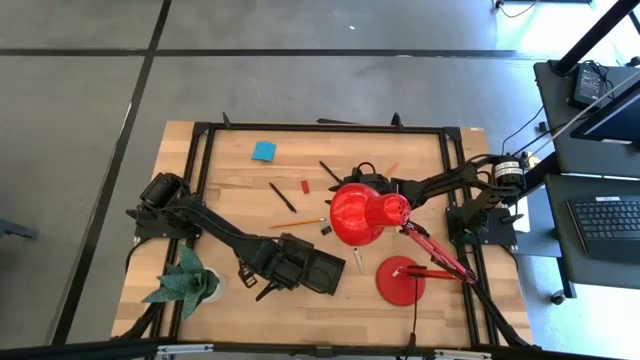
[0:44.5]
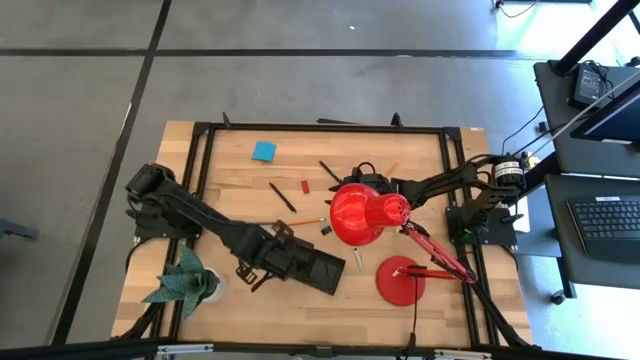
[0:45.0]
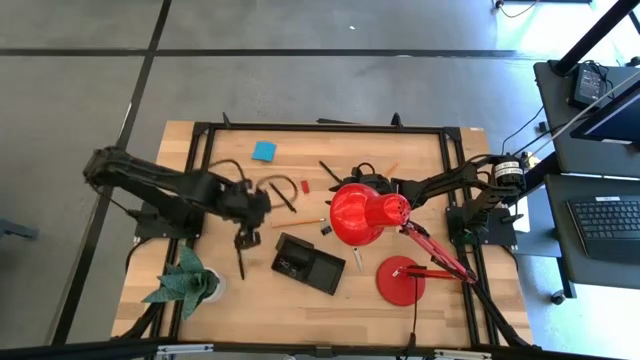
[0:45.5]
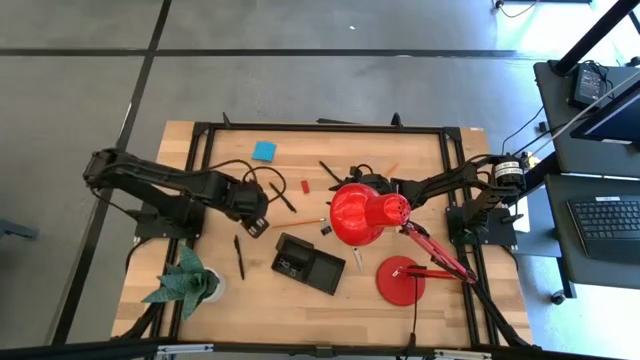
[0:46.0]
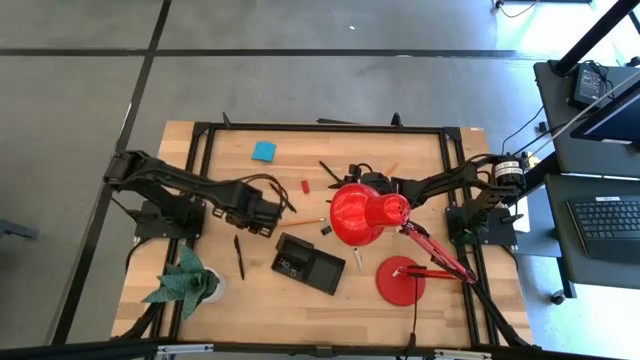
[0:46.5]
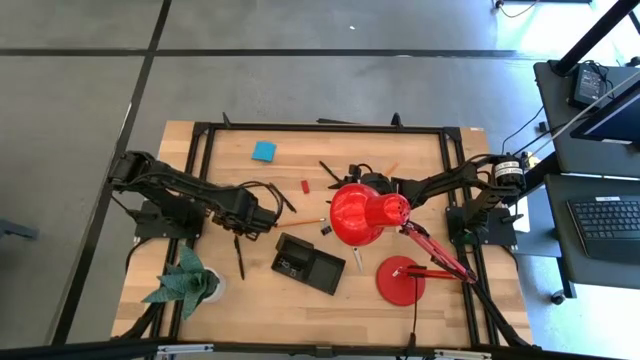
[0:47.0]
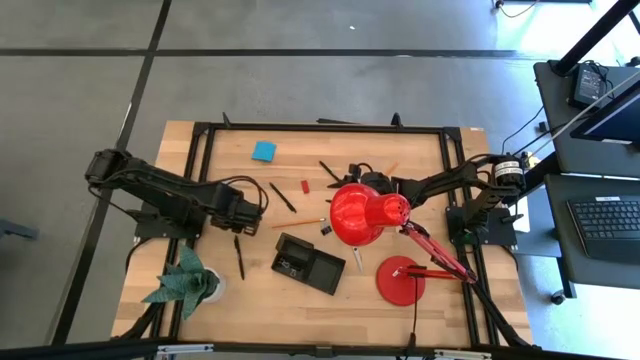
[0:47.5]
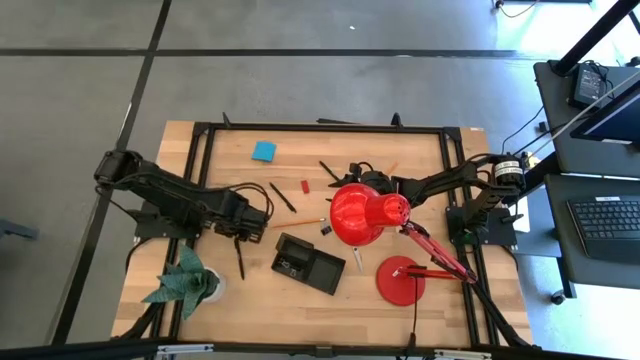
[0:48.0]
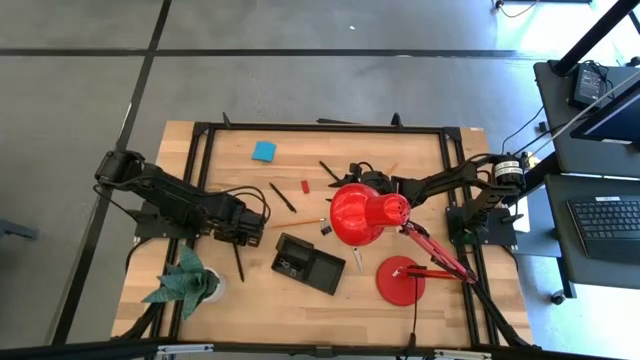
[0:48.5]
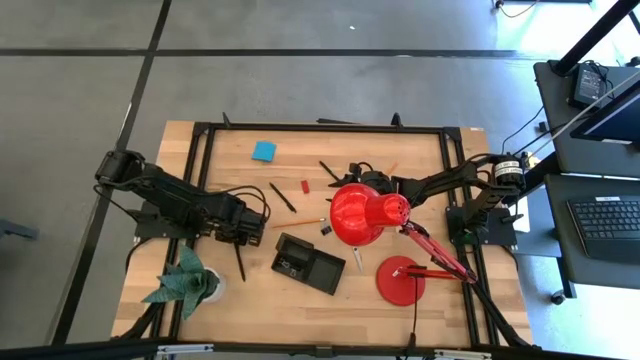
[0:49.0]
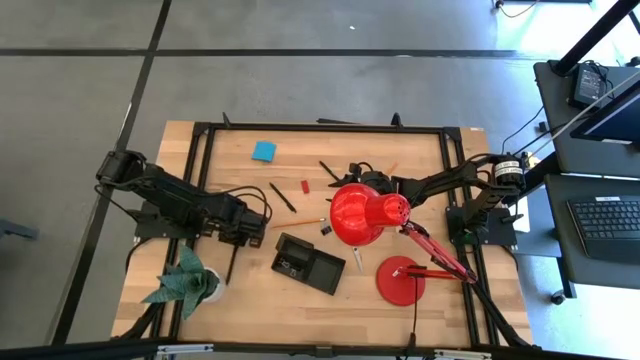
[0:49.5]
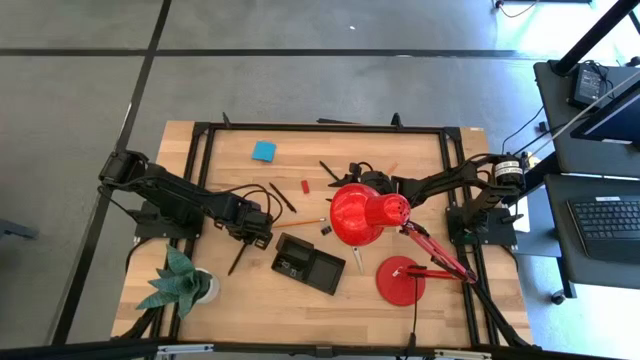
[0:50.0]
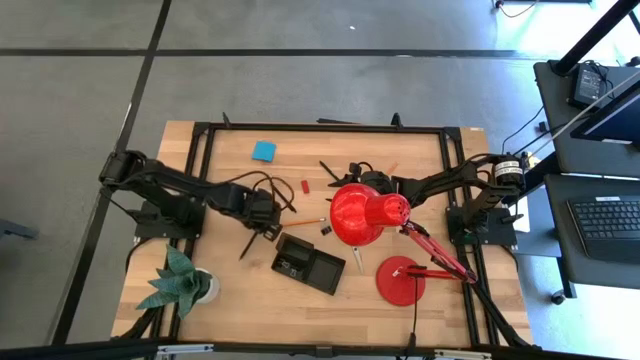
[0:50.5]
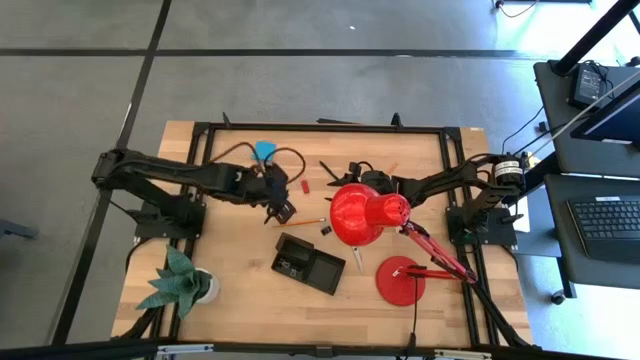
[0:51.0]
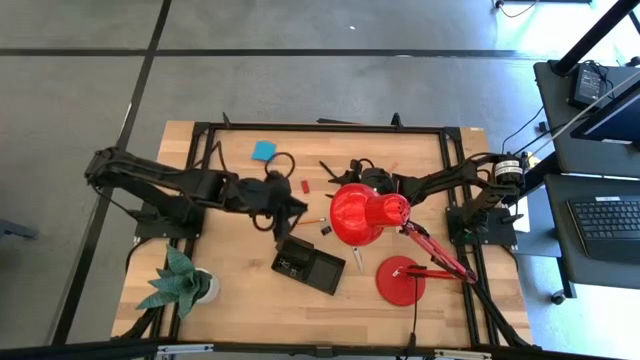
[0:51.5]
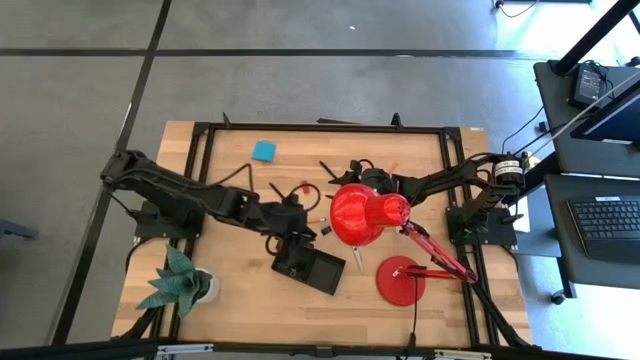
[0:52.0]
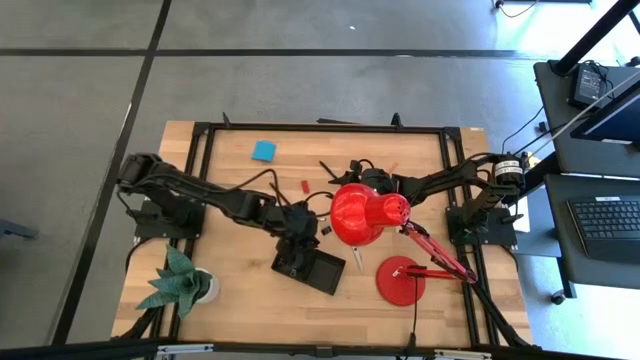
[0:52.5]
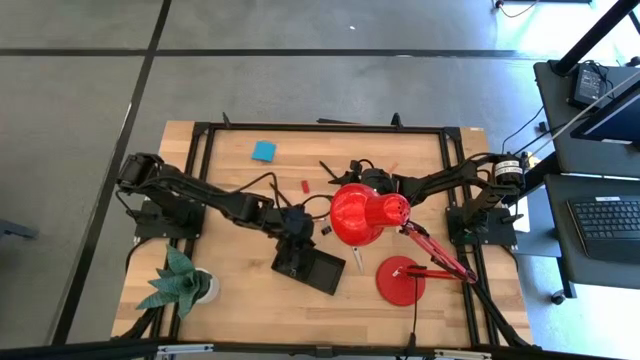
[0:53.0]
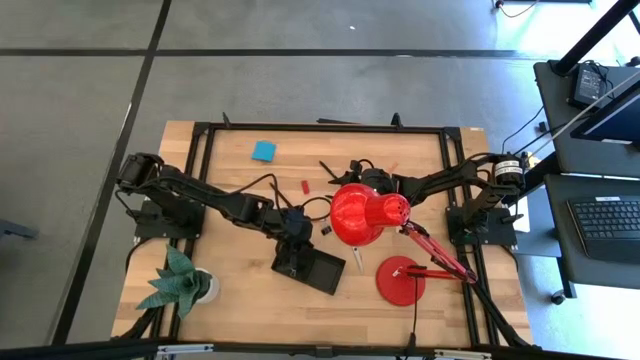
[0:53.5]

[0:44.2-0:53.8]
Task: Pick and place office supplies into organizer
Put the bottom black pen into the desk organizer

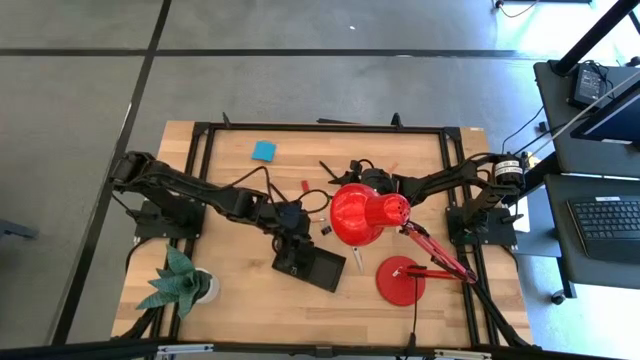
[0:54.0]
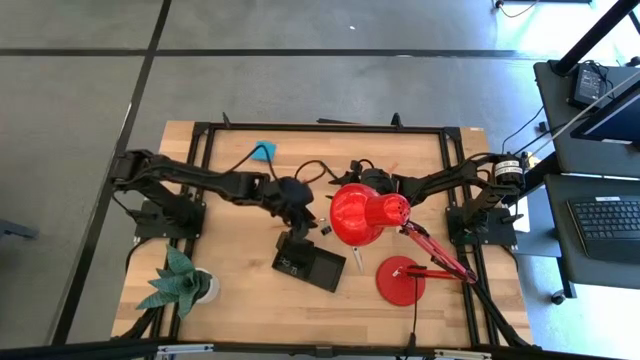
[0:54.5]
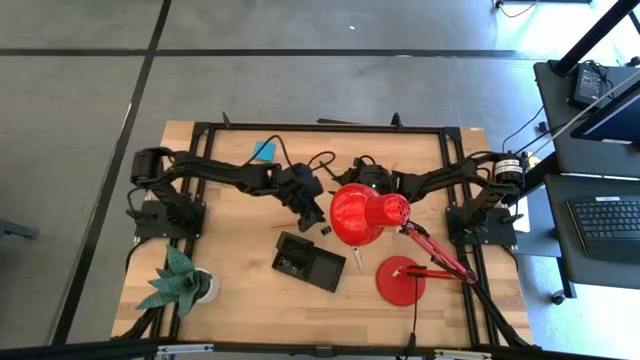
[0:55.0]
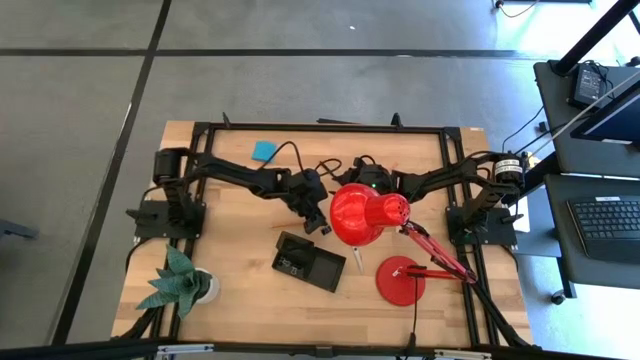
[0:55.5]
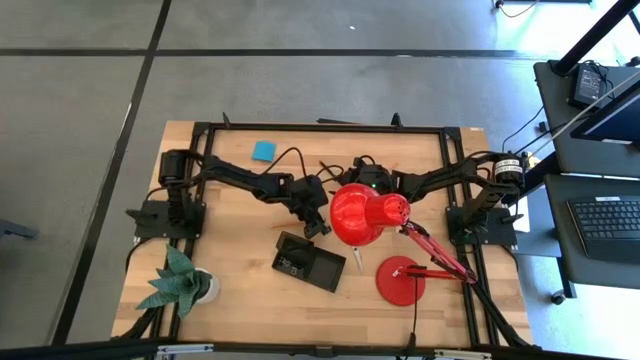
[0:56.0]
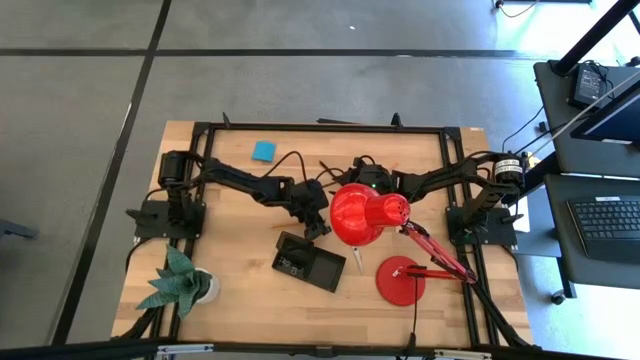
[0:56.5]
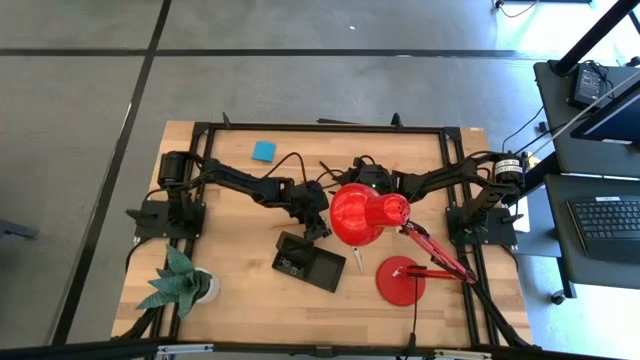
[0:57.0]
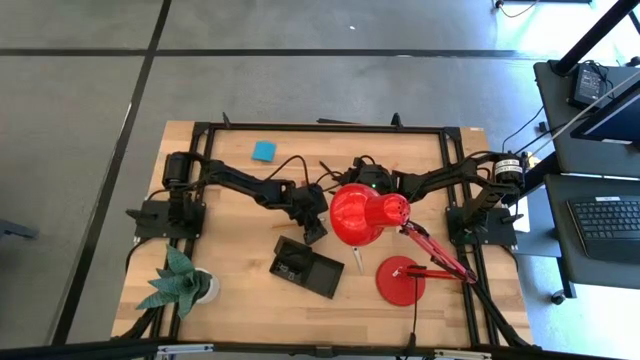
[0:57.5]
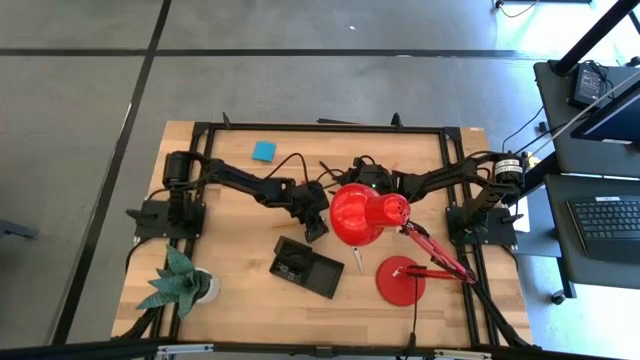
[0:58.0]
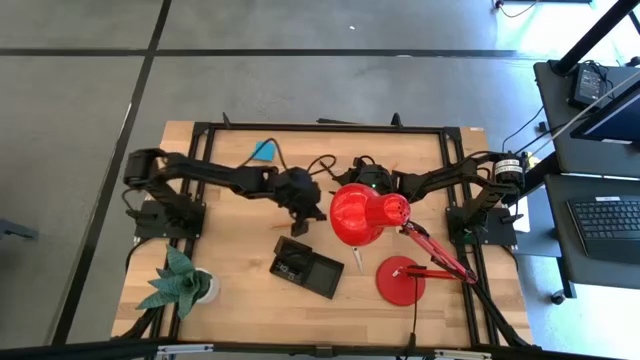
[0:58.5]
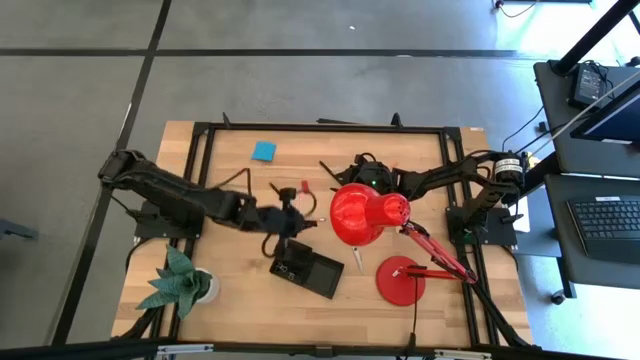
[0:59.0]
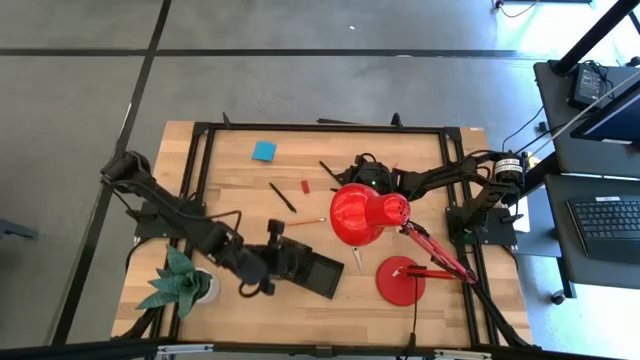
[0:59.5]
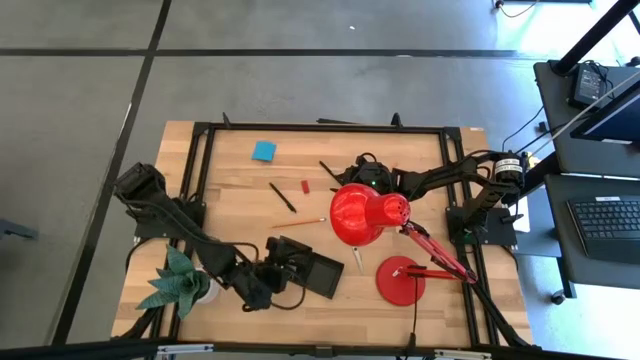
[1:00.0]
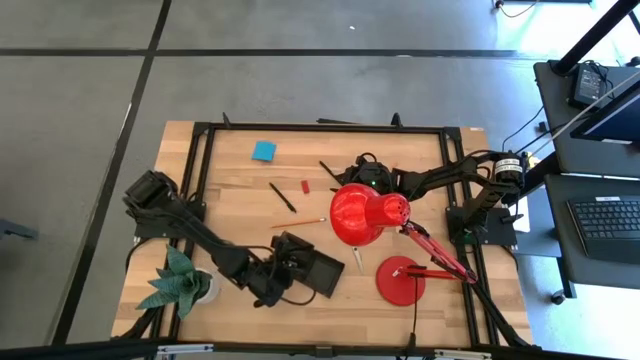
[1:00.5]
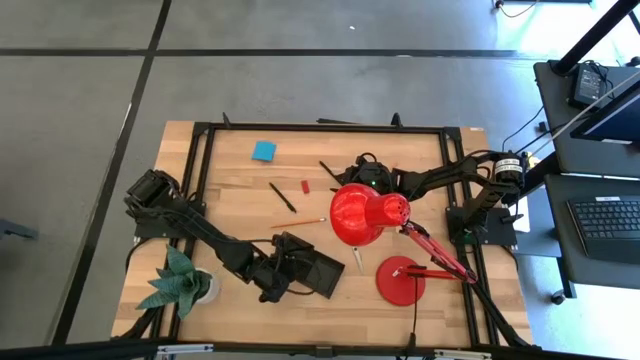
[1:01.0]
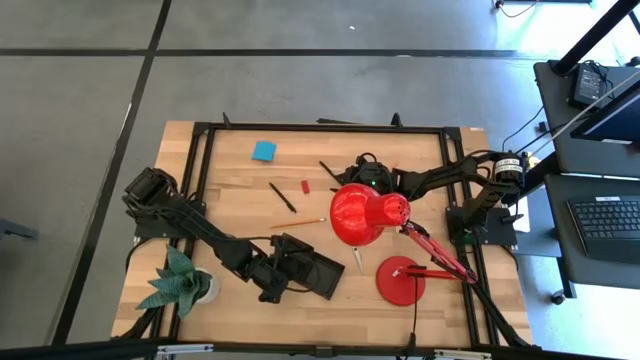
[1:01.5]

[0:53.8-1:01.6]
Put the black clip binder into the desk organizer

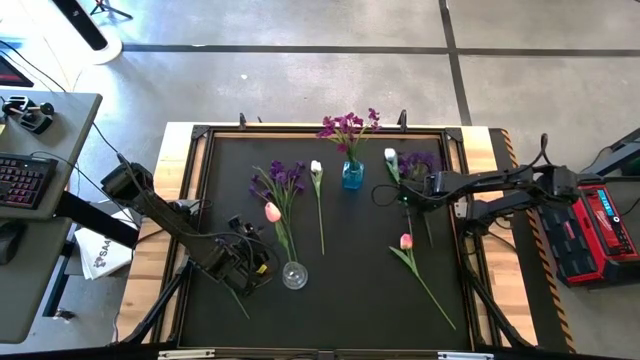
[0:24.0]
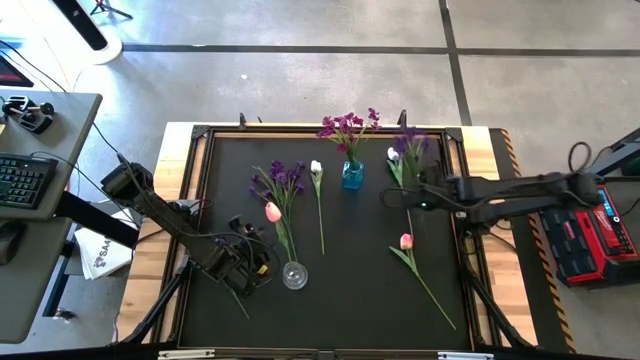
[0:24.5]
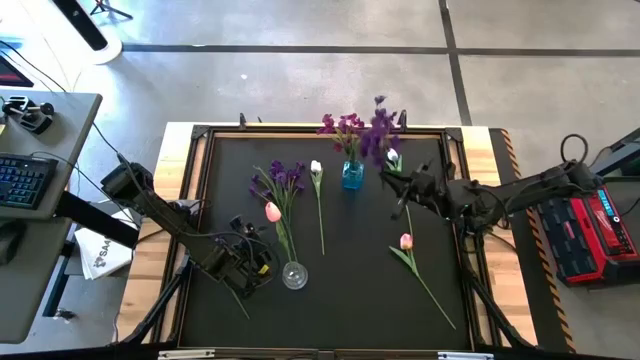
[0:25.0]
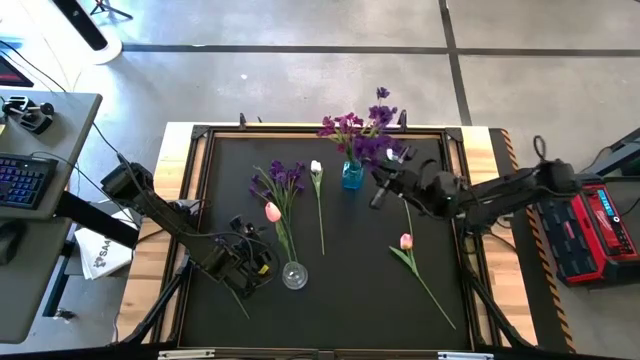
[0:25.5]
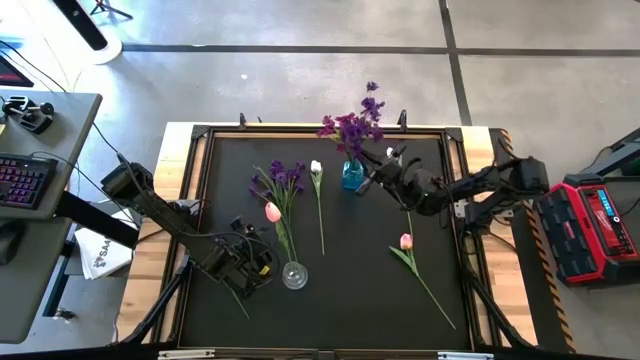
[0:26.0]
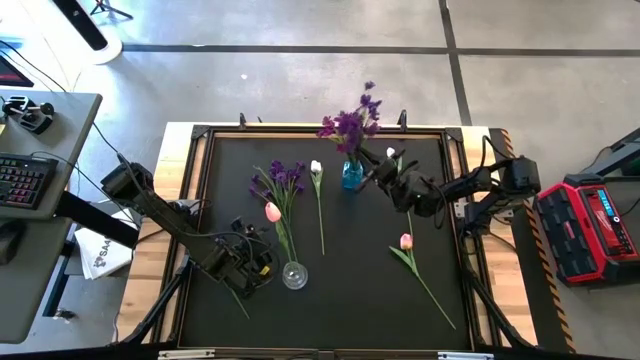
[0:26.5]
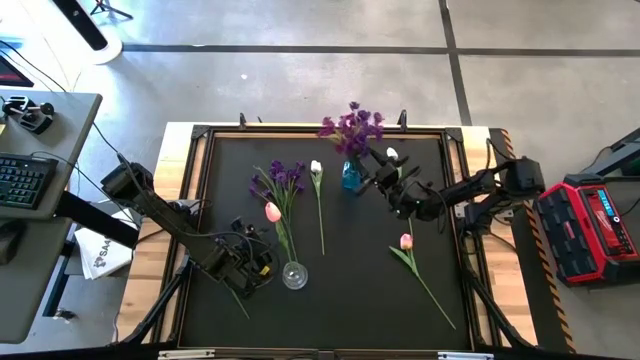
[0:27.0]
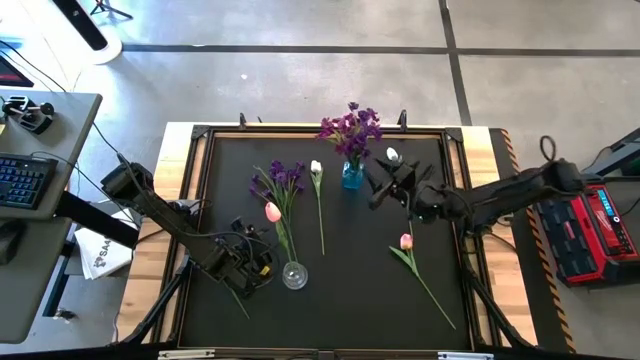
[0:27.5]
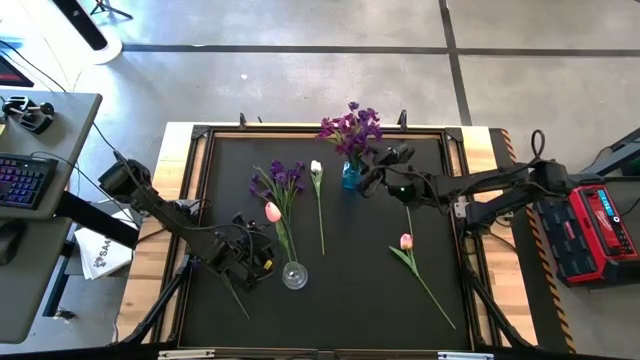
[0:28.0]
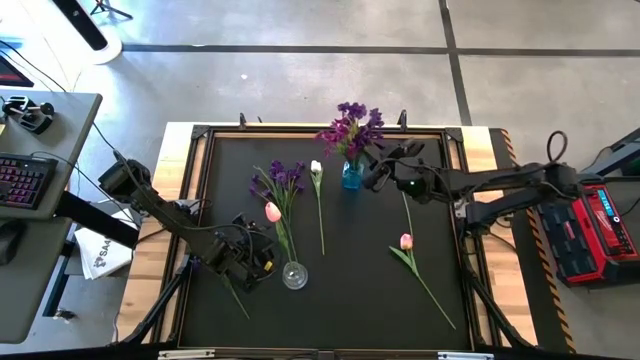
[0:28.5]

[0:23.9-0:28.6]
Task: Sort flowers into vase by color
Put the right dark violet flower into the blue vase
